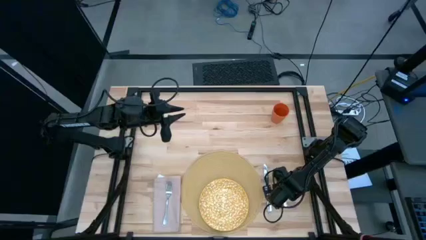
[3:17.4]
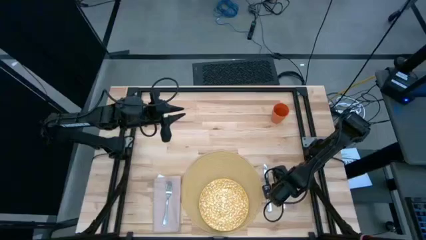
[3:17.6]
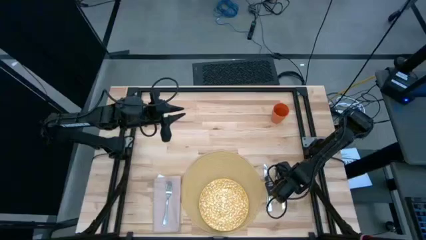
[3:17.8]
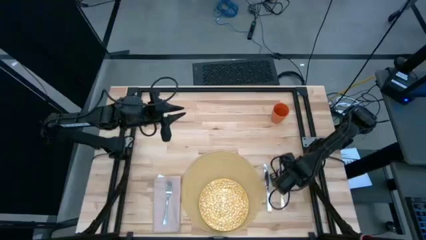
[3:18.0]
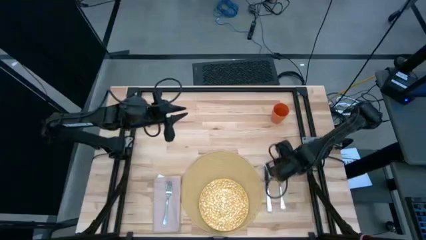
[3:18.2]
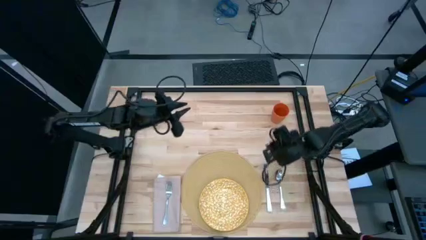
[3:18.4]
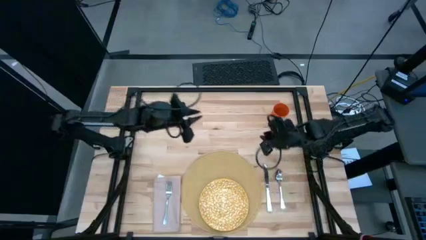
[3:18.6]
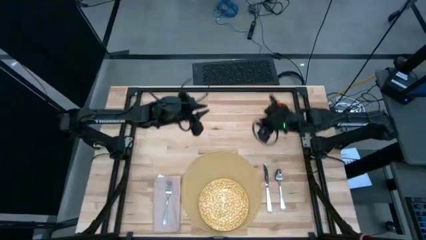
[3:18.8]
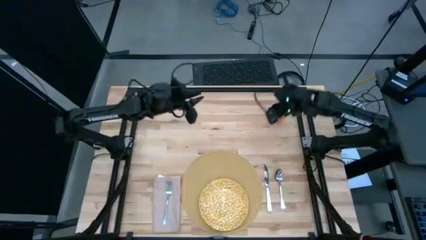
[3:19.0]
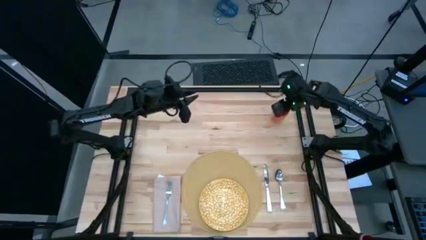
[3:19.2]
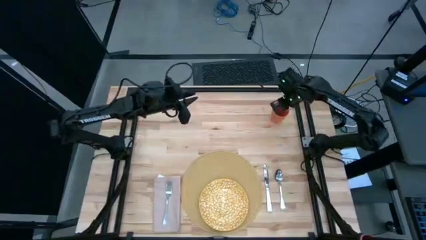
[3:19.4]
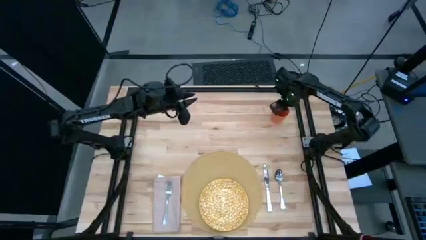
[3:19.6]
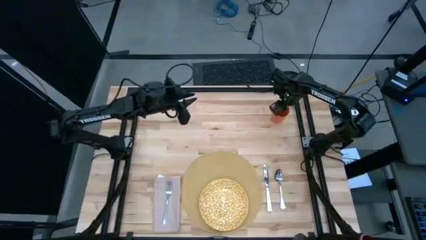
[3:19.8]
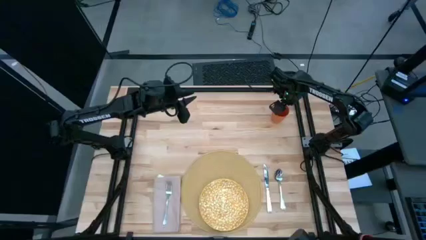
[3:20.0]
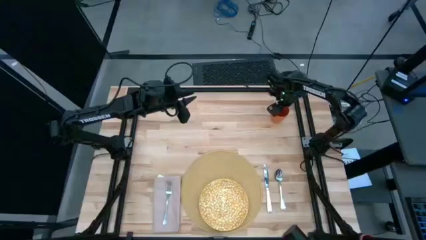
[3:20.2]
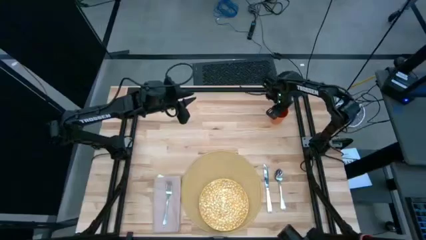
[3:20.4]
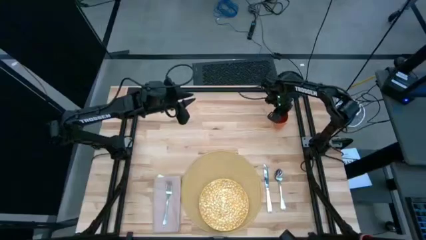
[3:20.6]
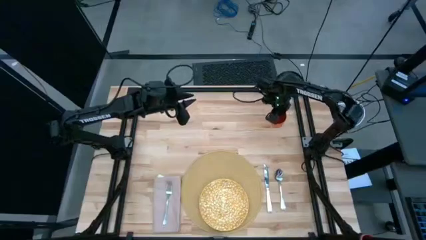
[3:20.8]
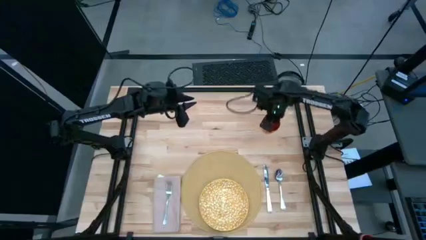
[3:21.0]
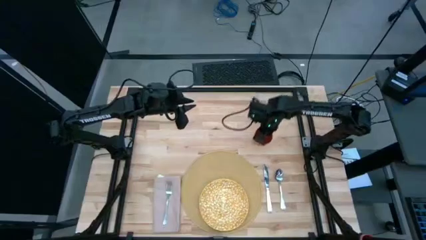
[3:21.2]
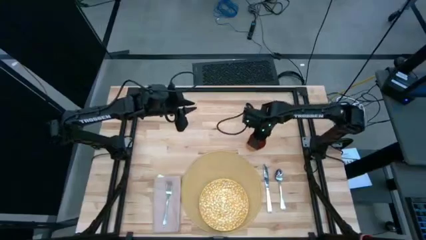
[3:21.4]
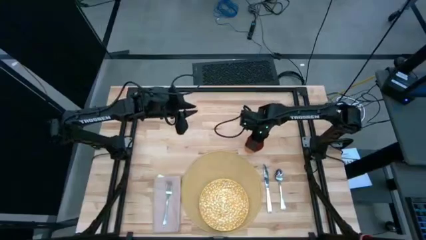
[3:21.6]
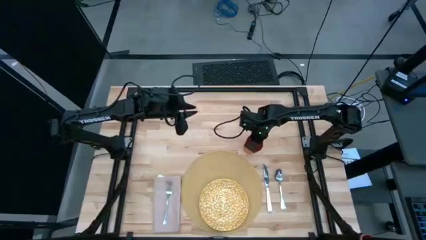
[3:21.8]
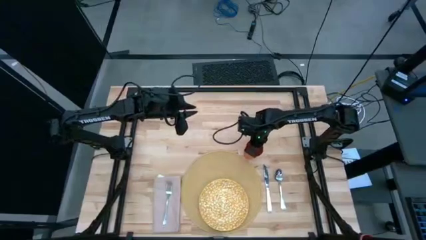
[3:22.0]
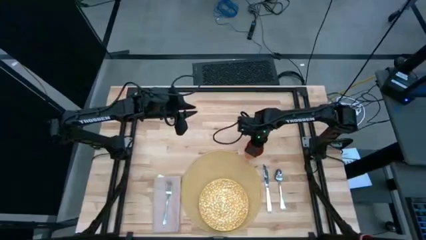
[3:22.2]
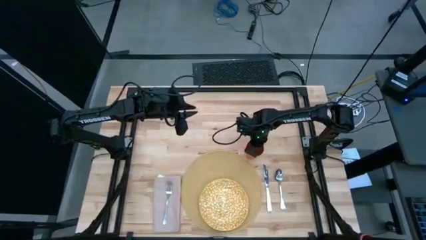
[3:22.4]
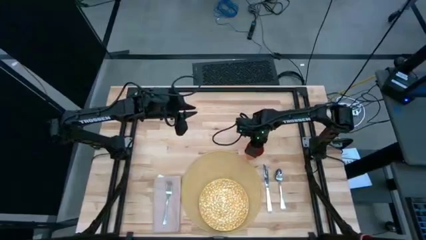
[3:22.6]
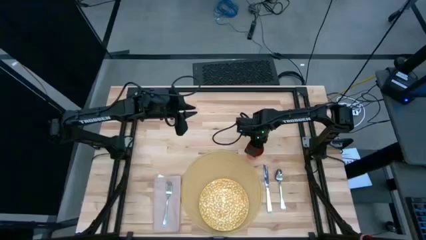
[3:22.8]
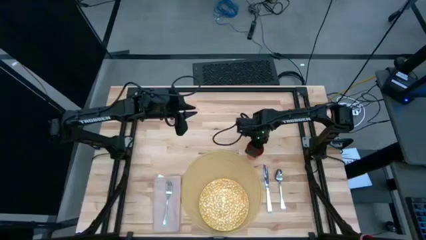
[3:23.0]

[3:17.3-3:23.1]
Task: Set table place
Put the cup on top of the brown table mat

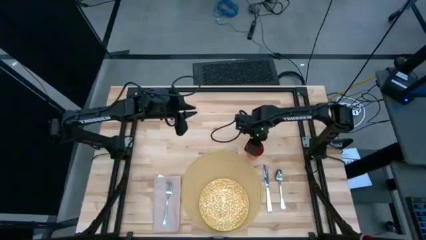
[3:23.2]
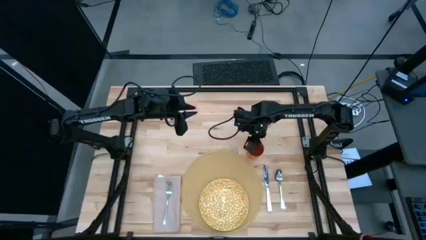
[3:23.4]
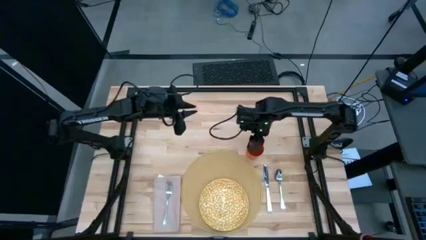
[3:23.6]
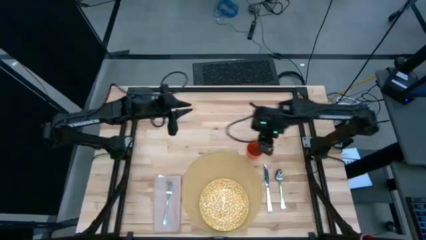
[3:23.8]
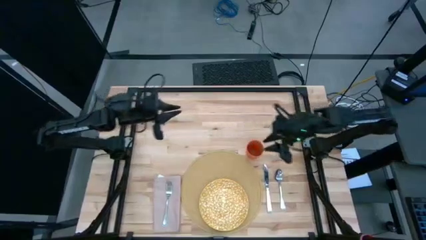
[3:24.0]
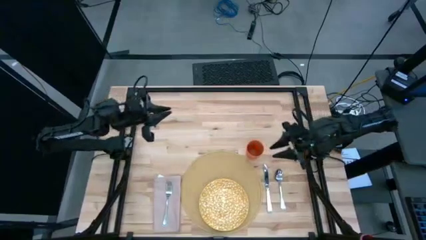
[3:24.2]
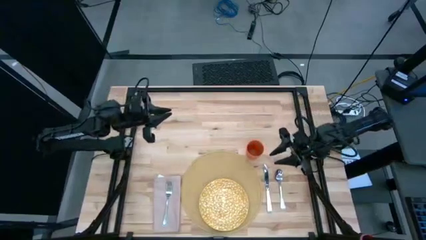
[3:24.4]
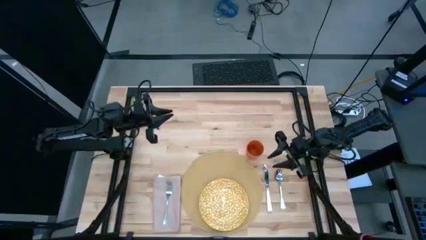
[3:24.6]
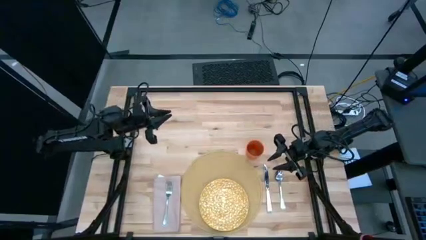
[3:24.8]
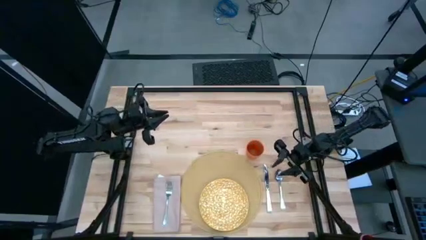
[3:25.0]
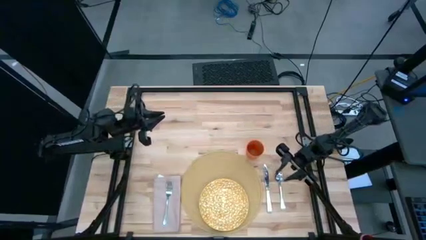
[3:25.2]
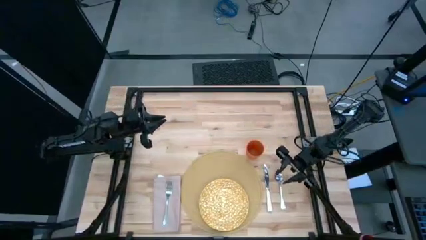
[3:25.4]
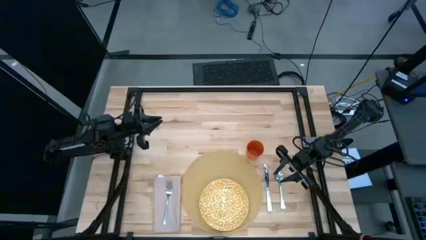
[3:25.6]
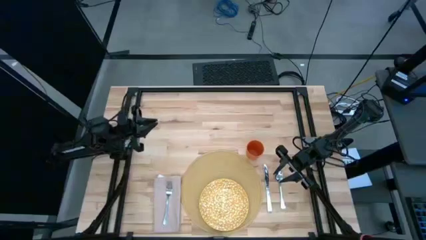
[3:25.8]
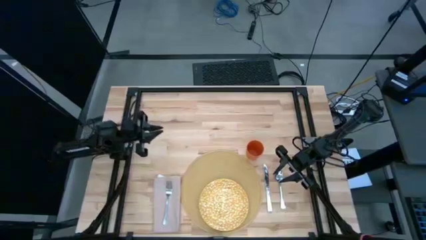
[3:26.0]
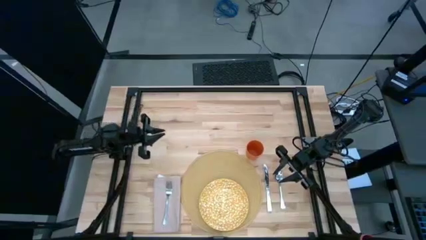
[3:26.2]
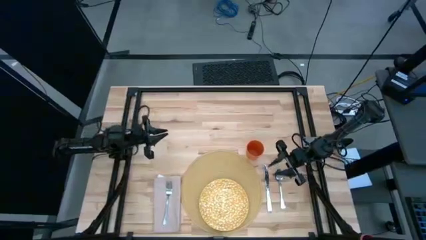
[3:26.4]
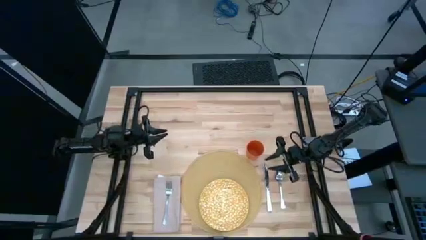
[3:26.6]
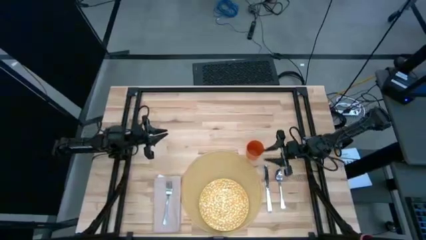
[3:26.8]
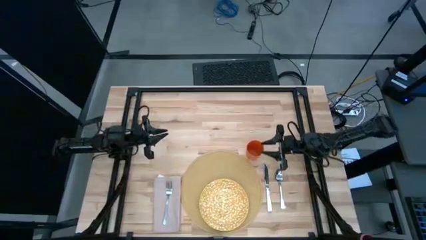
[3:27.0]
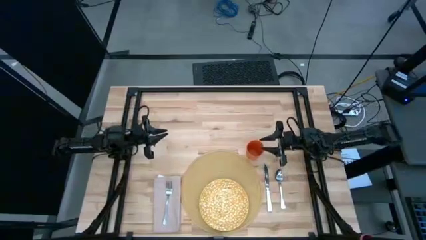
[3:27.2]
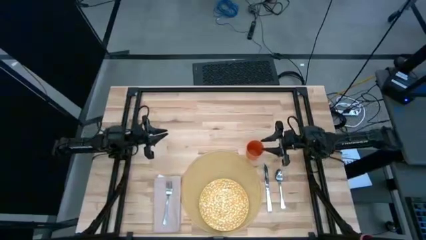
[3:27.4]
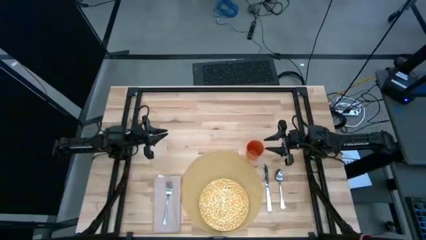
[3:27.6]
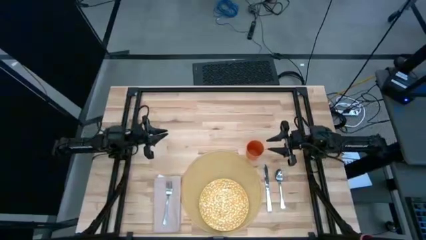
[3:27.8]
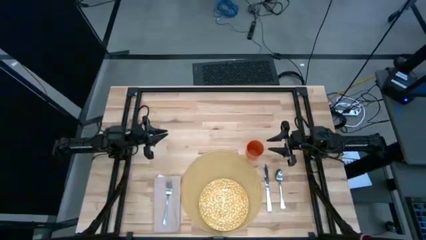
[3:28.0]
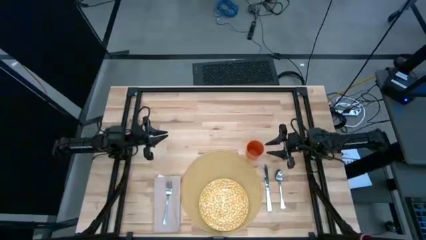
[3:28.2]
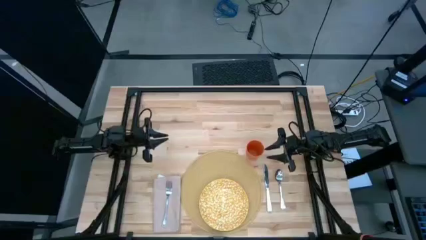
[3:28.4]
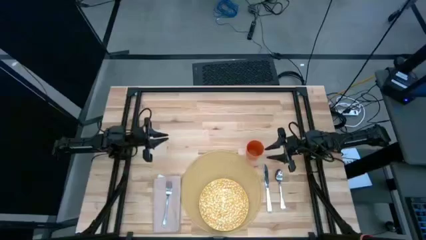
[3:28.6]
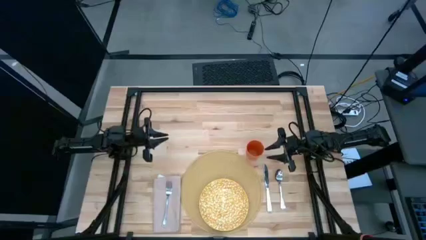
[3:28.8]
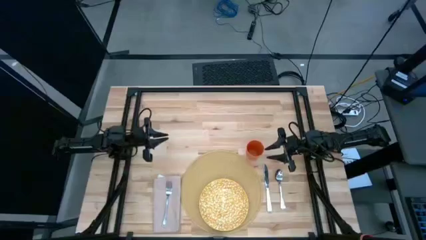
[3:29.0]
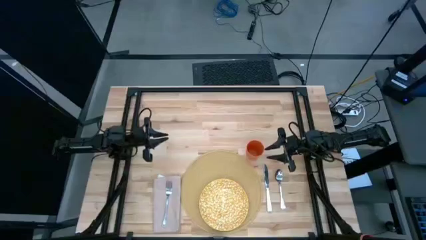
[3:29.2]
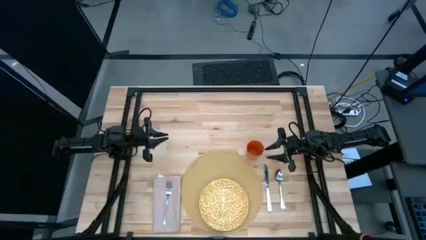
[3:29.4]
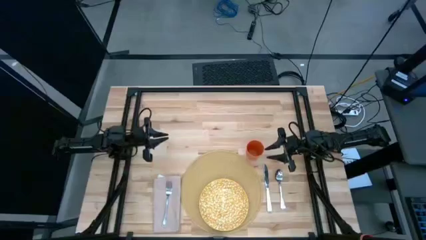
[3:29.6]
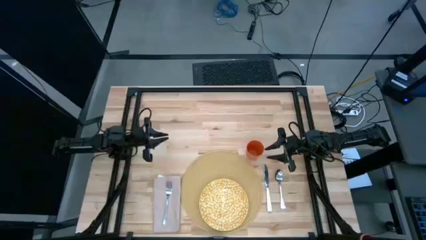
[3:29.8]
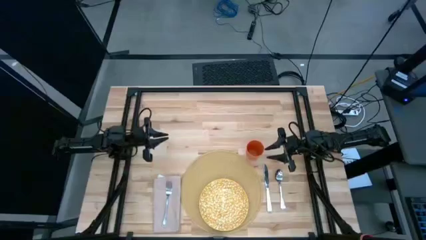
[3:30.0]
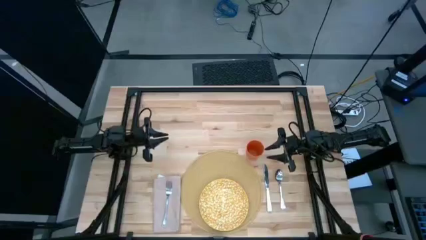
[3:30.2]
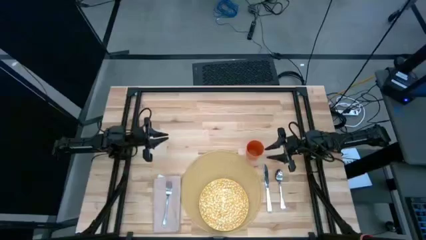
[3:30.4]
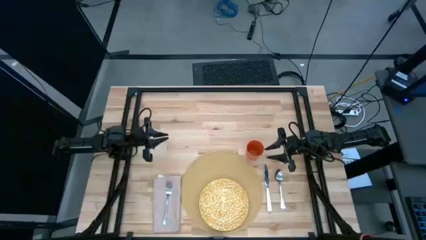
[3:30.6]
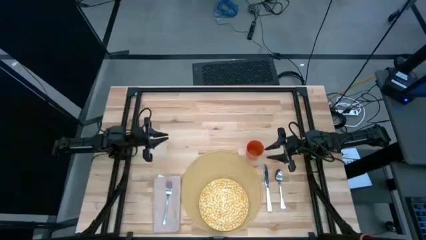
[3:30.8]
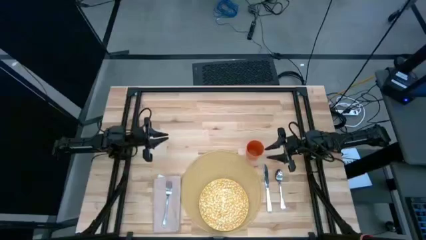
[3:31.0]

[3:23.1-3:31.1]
Return to Home Position

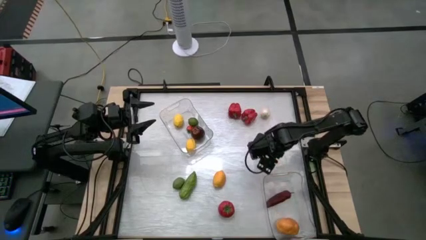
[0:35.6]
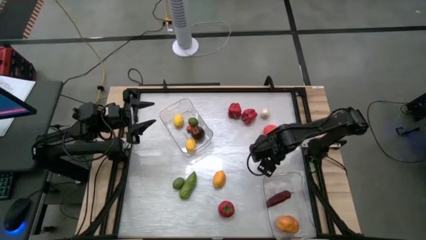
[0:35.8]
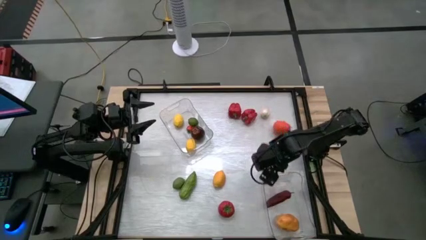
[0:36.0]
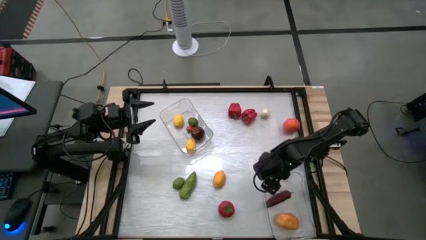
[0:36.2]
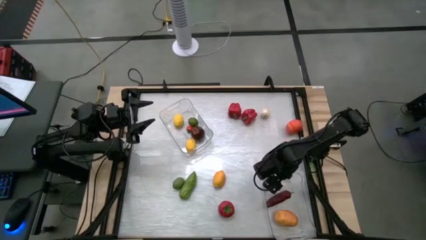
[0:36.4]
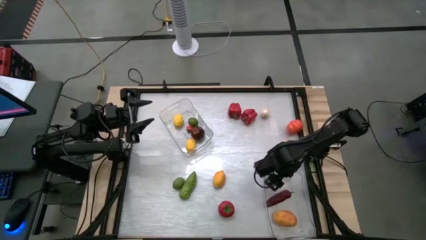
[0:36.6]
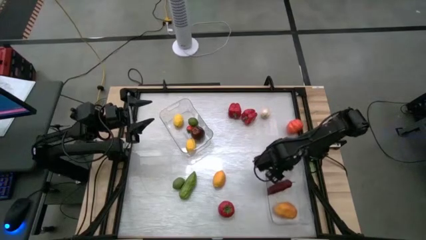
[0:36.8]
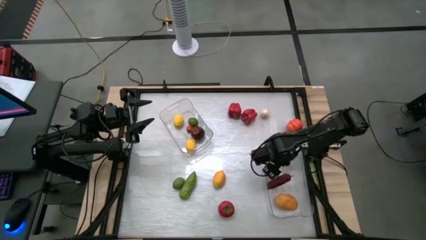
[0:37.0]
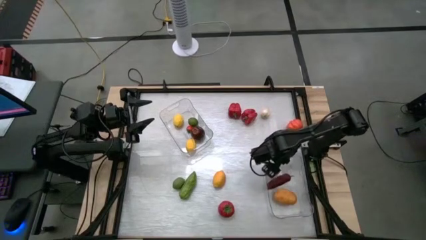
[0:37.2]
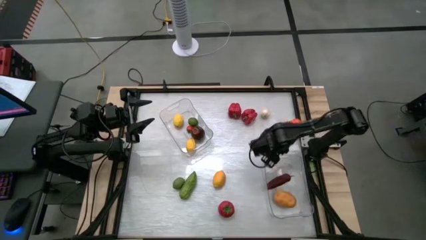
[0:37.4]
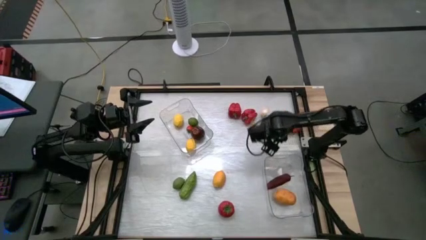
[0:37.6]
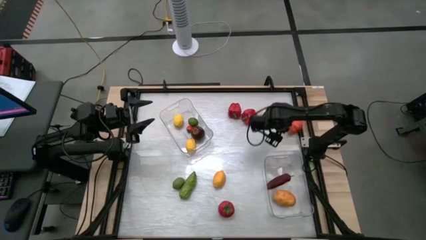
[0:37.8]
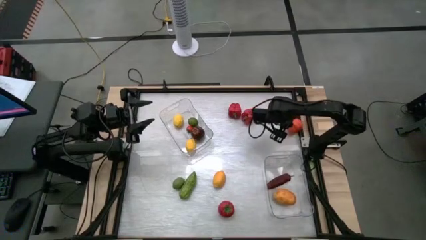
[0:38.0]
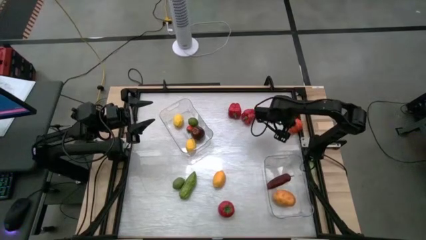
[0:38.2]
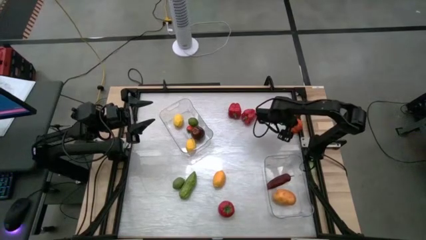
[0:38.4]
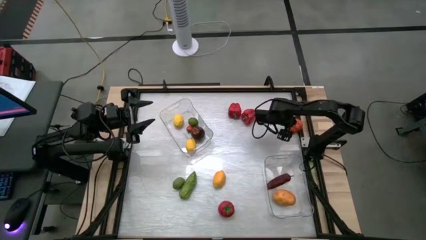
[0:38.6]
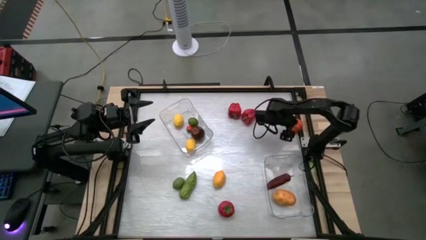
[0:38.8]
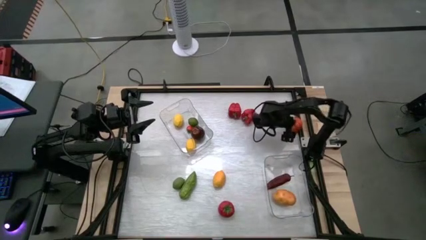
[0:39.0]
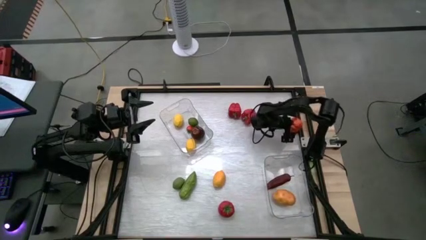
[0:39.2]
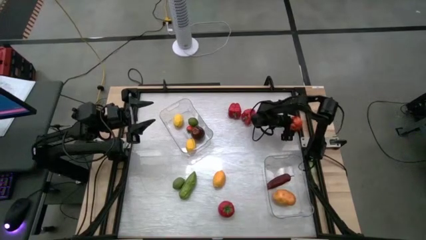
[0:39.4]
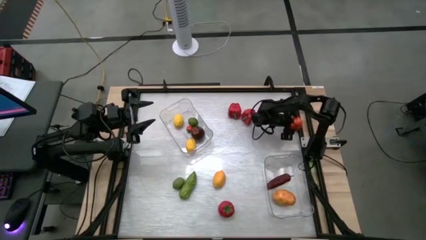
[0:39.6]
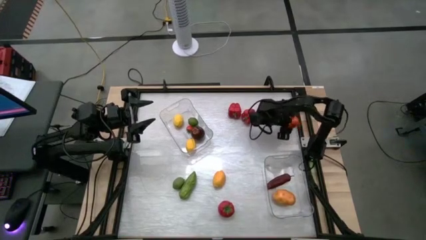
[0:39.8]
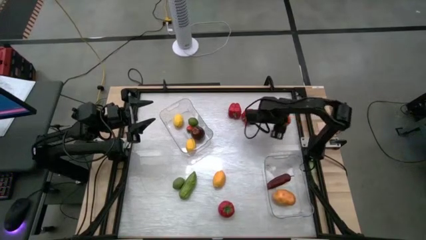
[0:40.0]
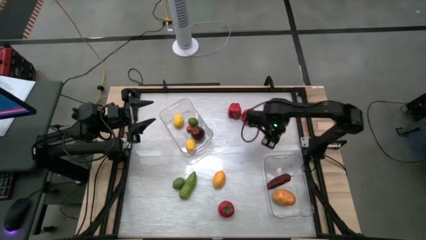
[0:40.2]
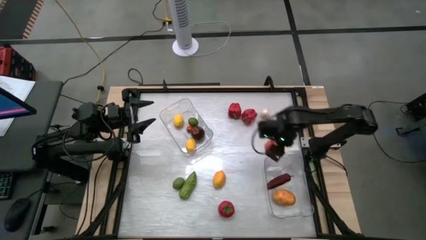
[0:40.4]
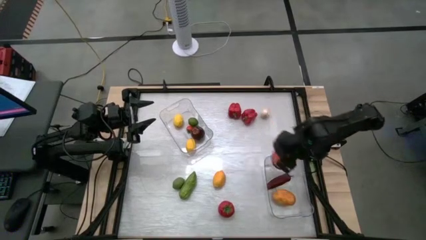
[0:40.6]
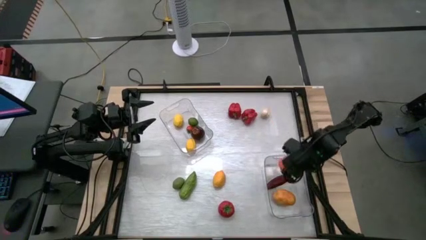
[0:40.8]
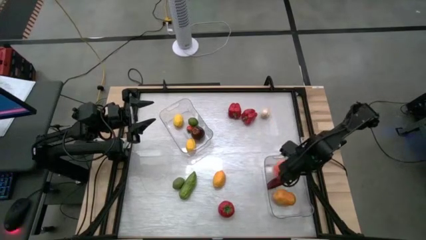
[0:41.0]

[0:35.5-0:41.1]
Task: Sort produce into baskets
Put the orange pumpkin into the bottom transparent bin
